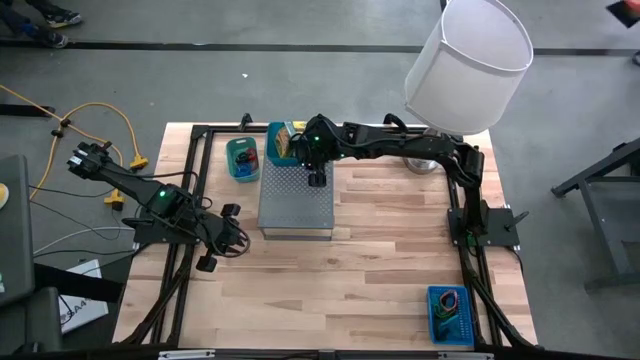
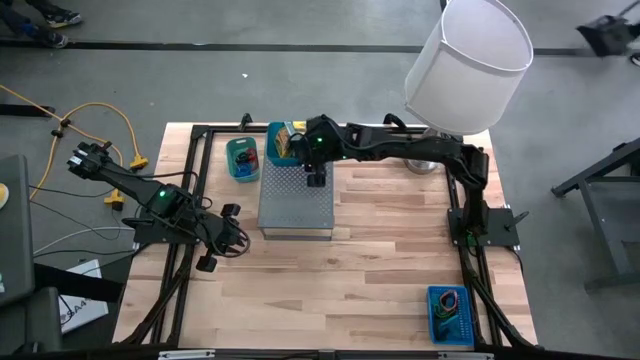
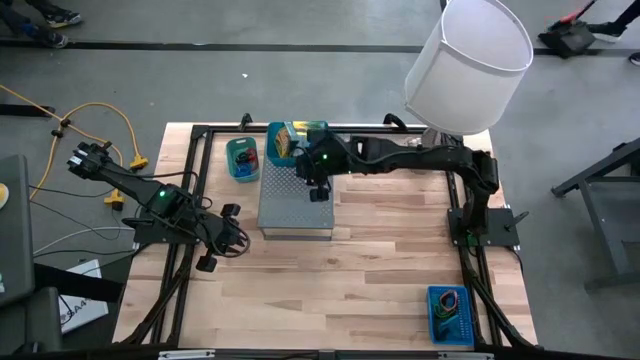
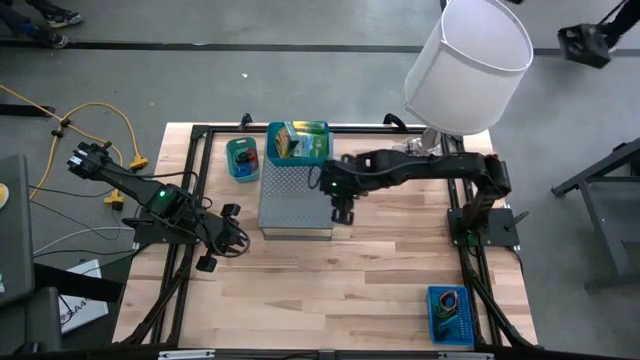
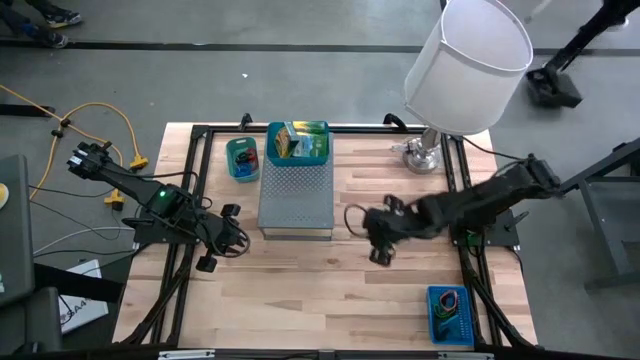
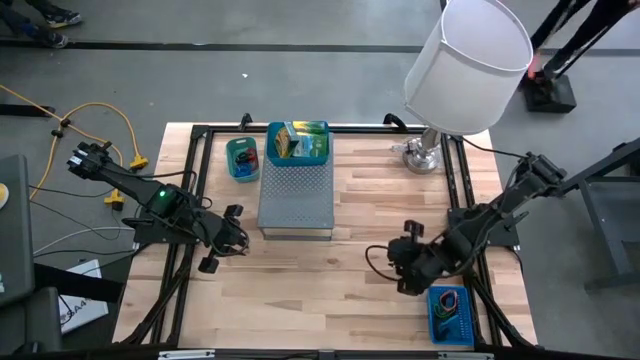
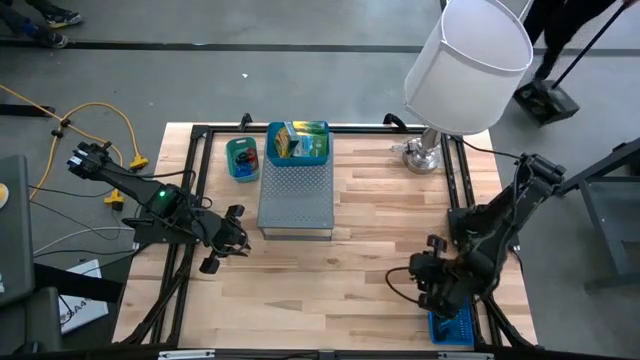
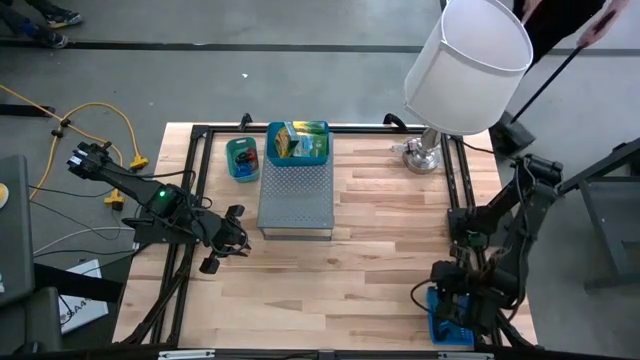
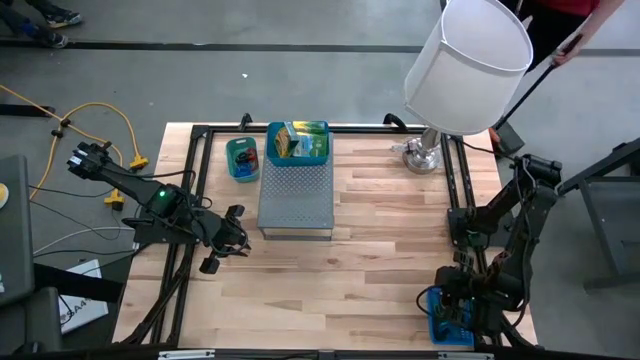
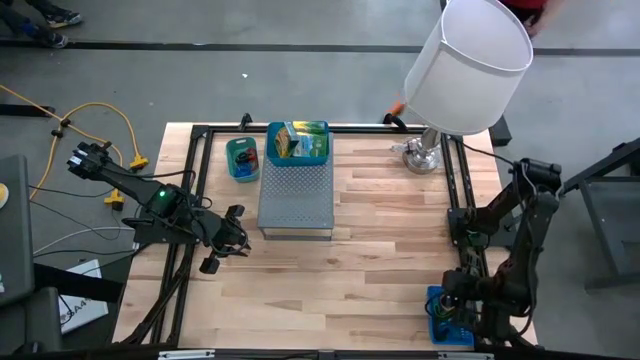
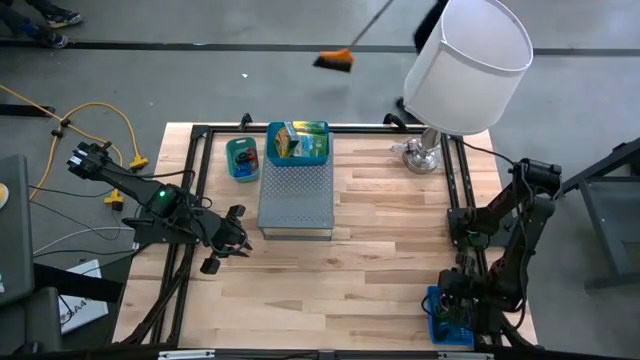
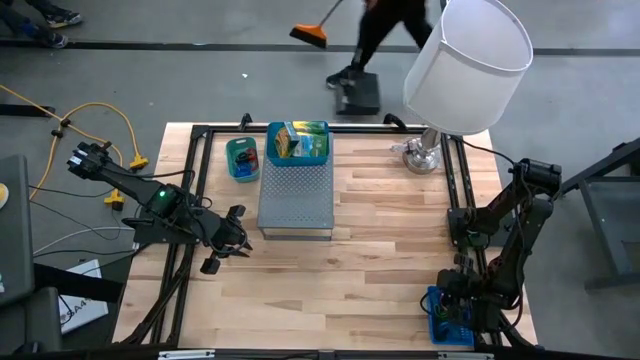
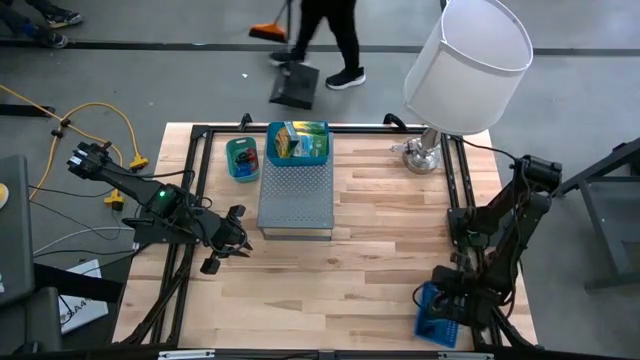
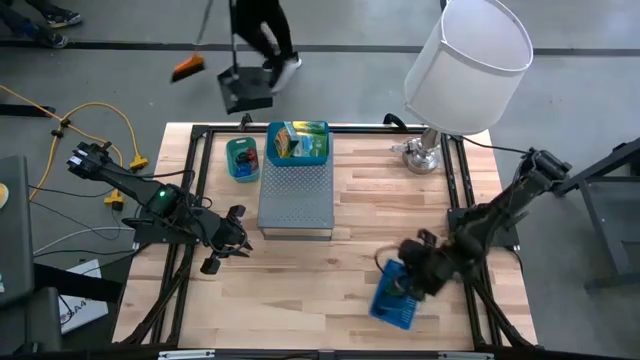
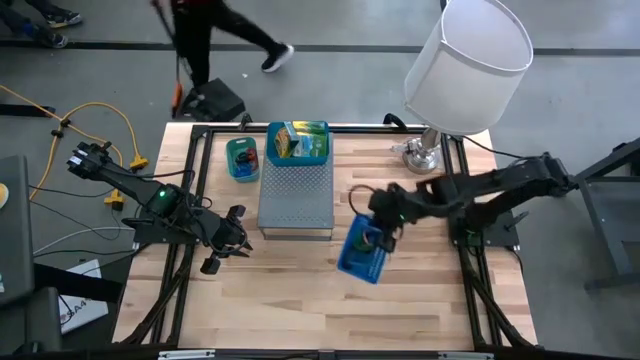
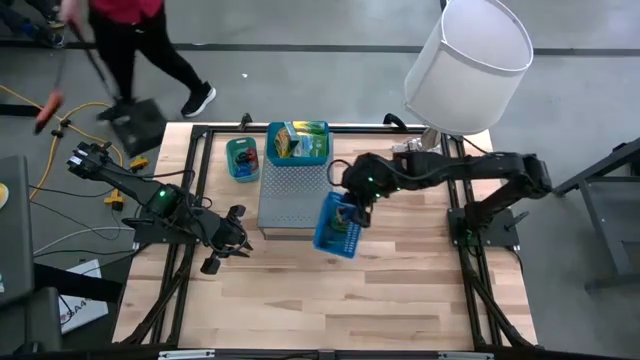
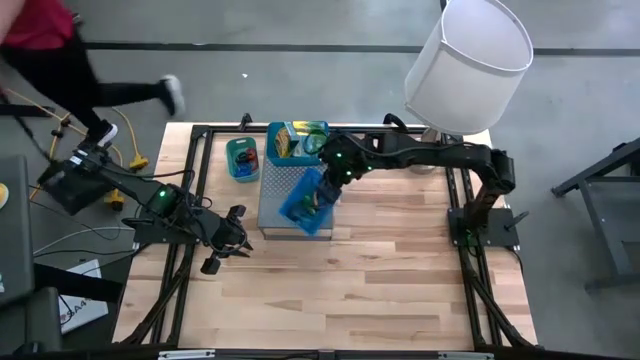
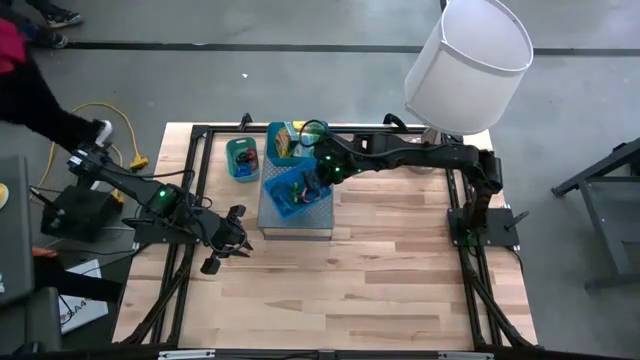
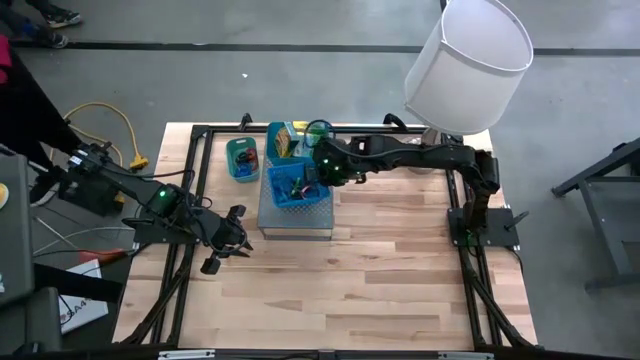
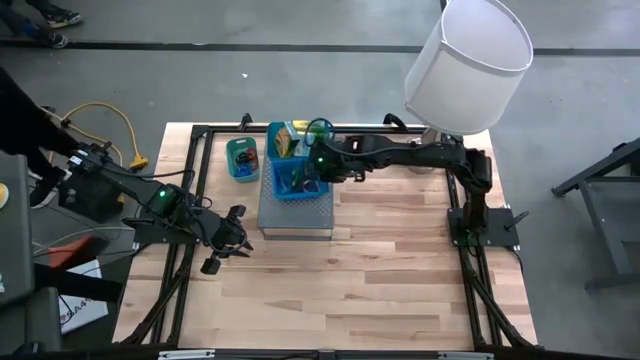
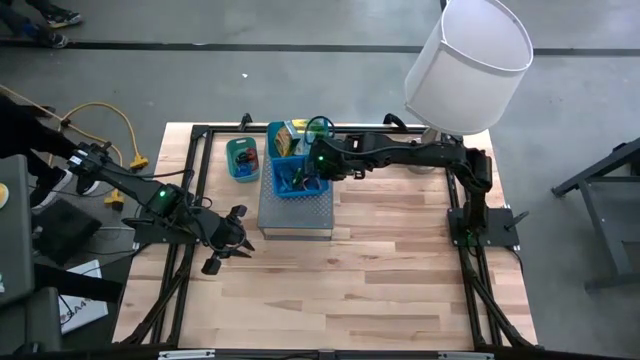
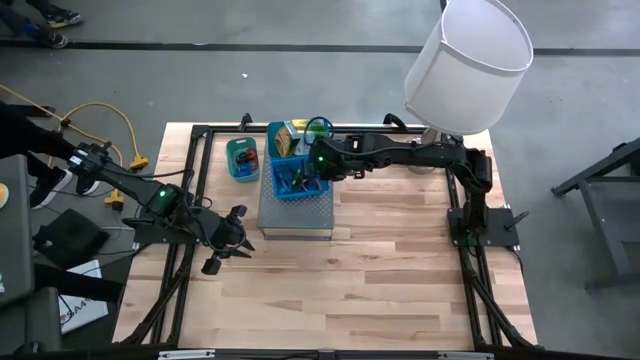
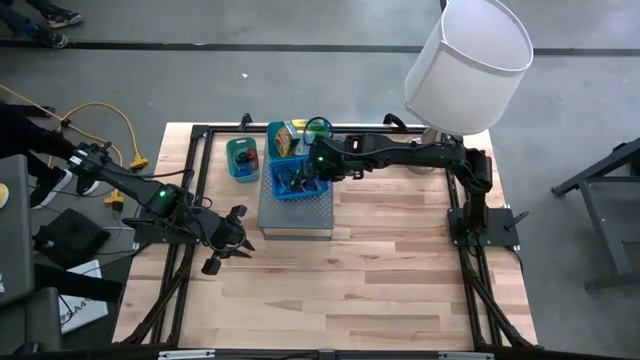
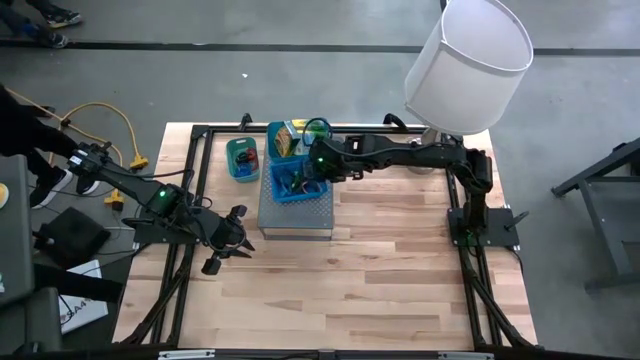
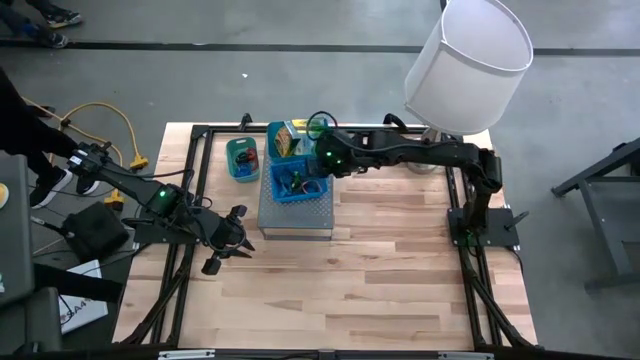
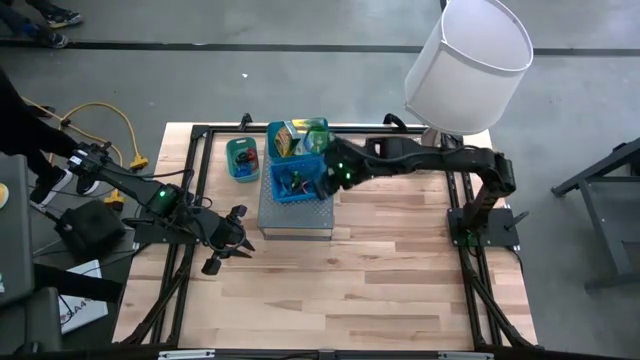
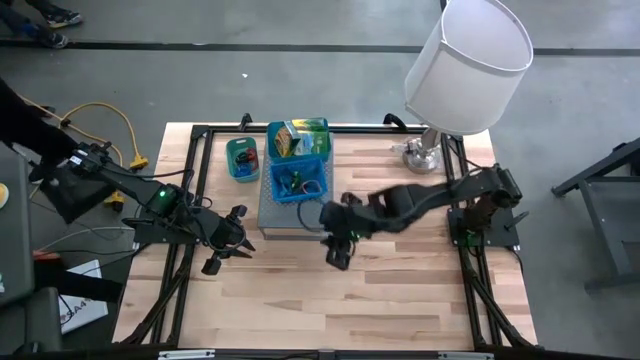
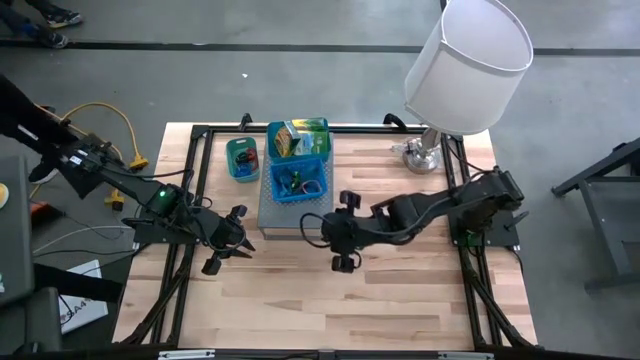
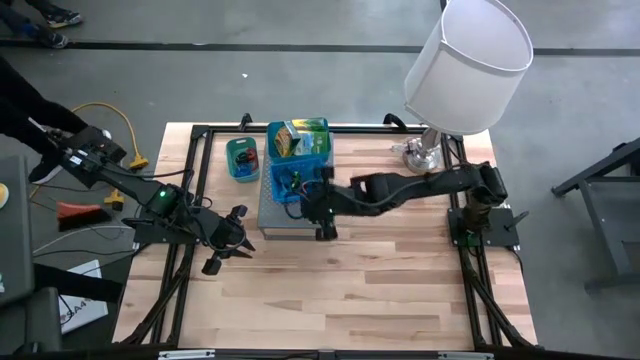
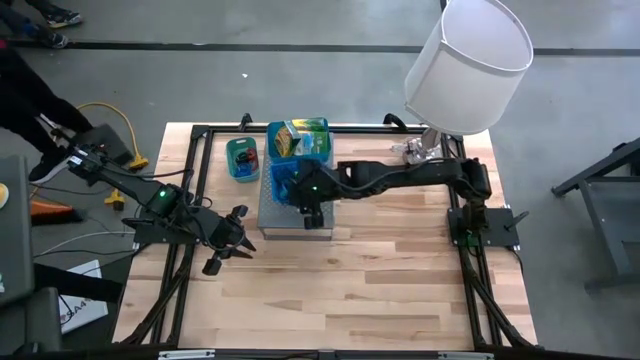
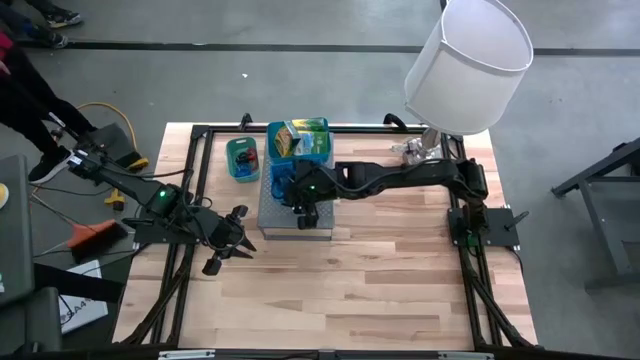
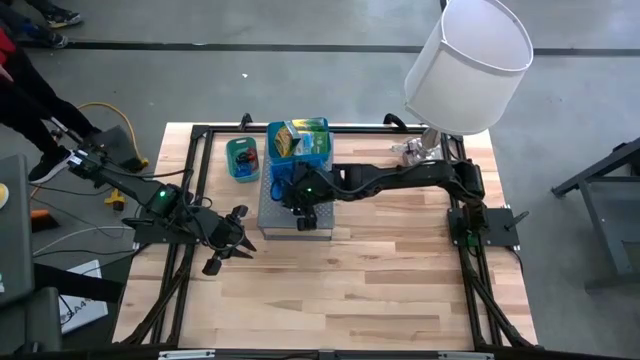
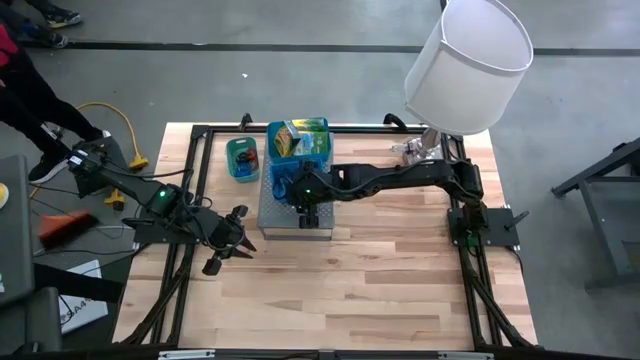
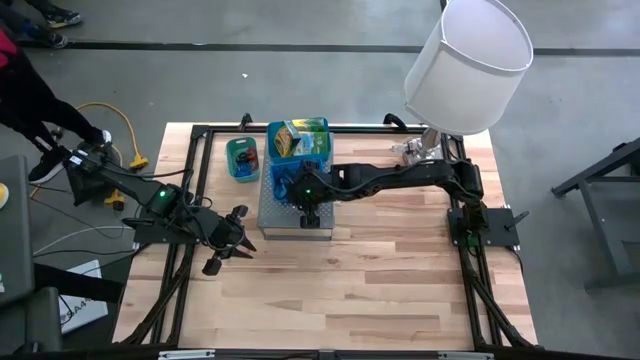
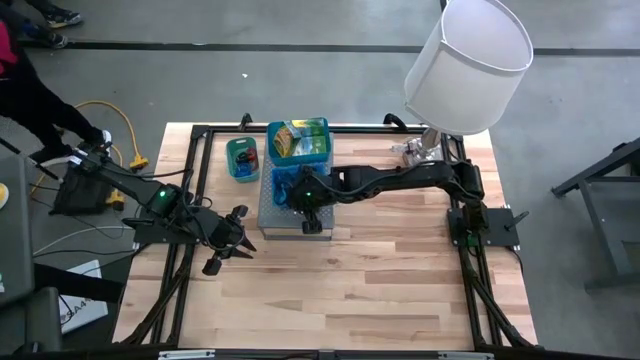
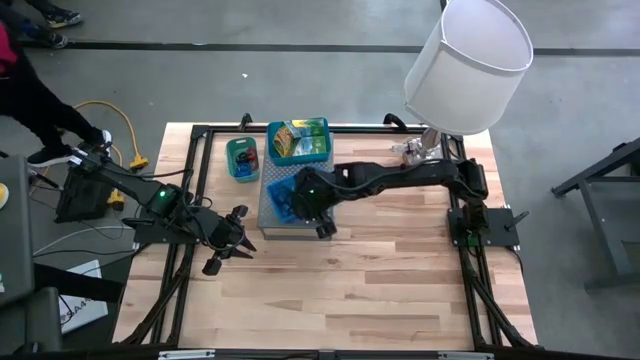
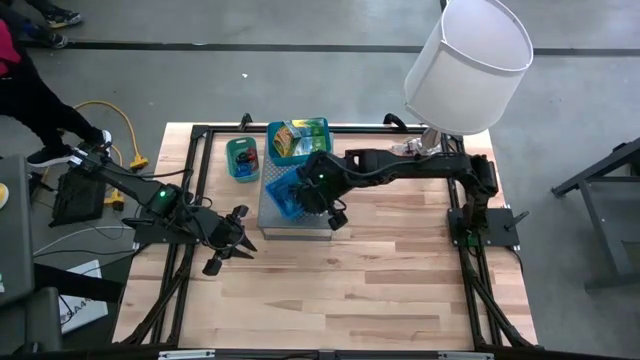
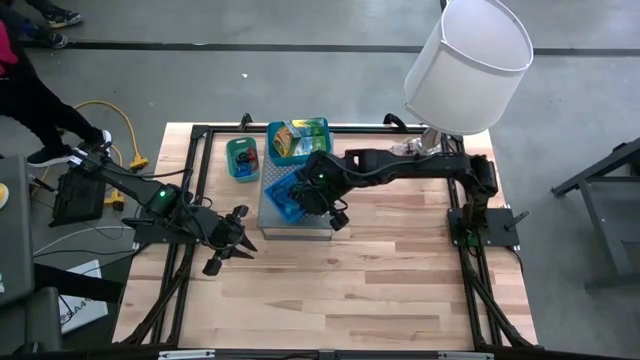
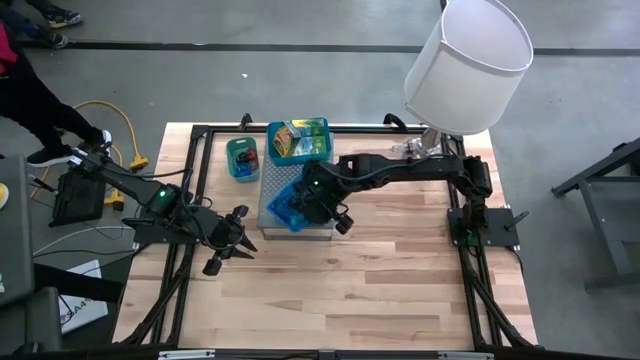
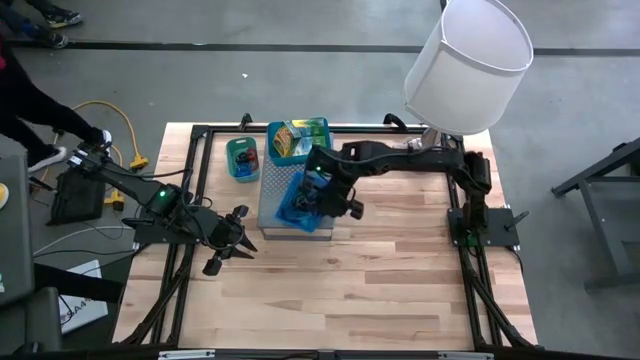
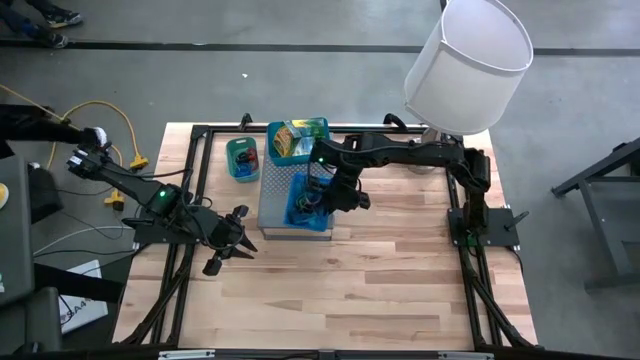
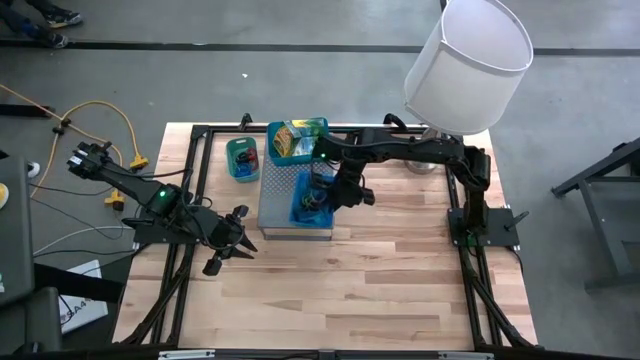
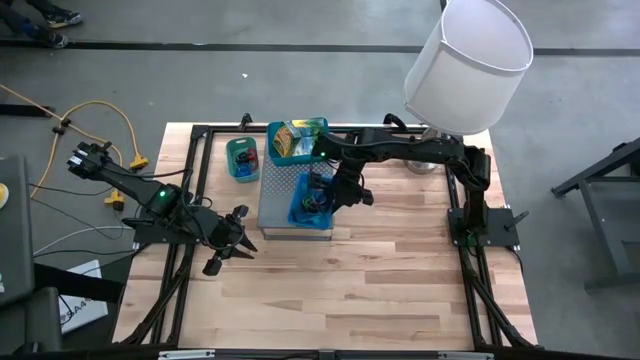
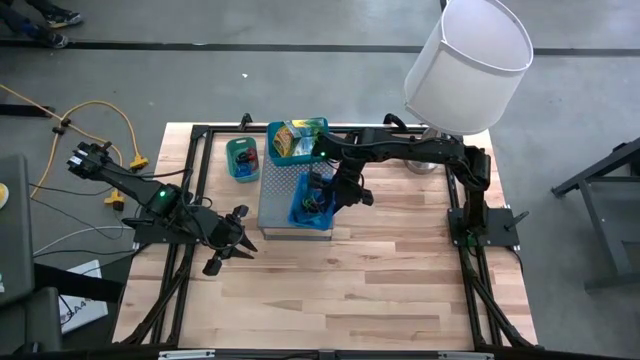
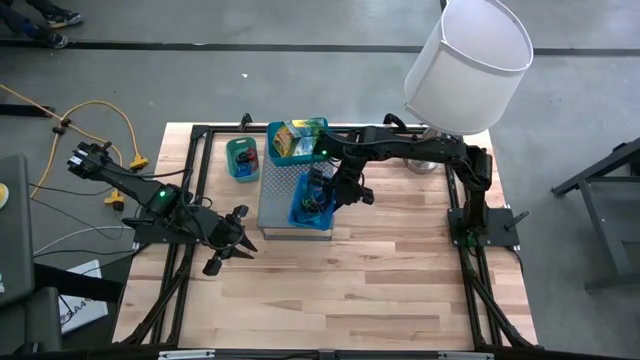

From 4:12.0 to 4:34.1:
Task: Pick & Place Office Desk Supplies
Put the blue basket with rubberbands on the shelf
